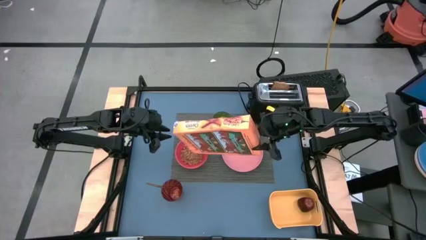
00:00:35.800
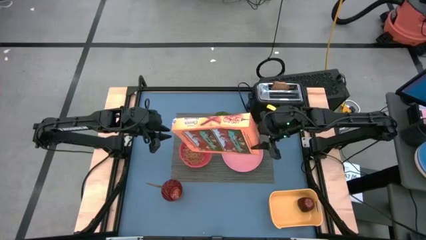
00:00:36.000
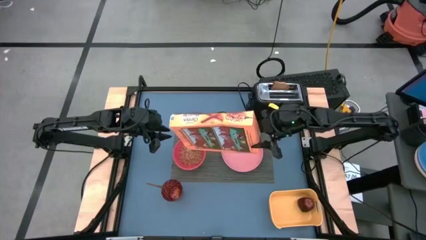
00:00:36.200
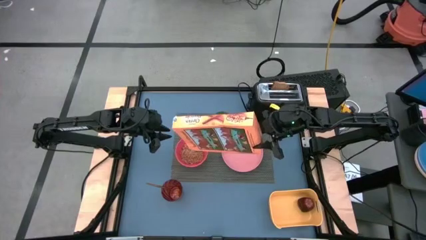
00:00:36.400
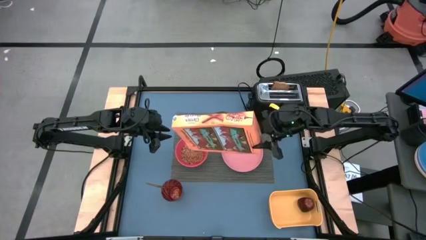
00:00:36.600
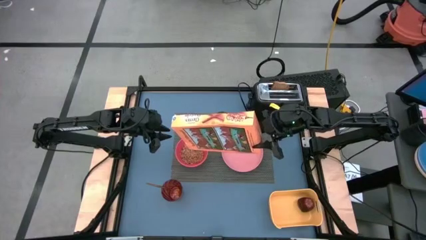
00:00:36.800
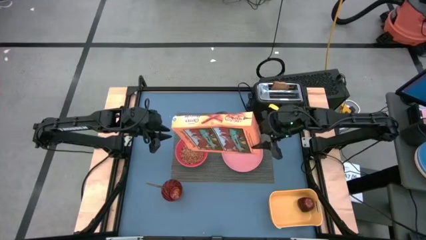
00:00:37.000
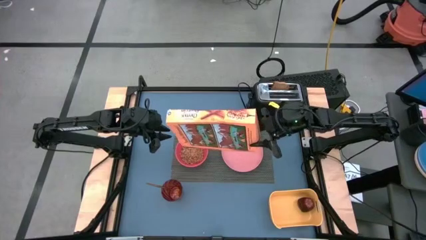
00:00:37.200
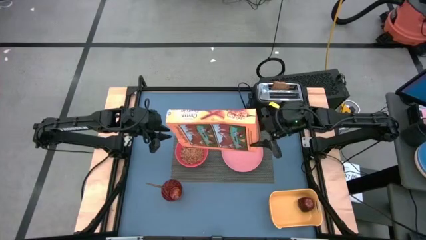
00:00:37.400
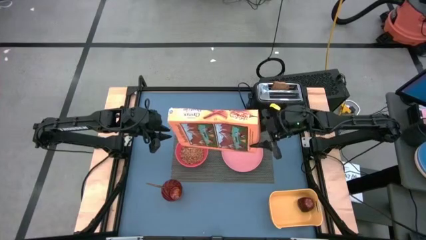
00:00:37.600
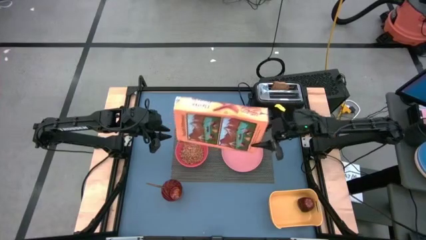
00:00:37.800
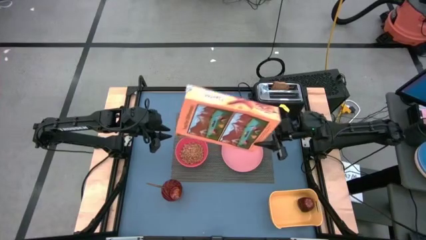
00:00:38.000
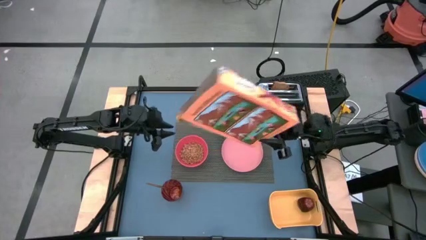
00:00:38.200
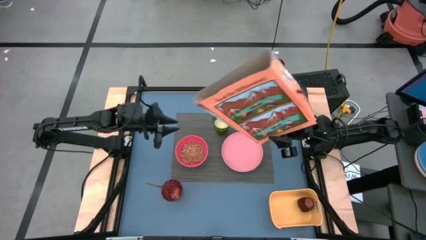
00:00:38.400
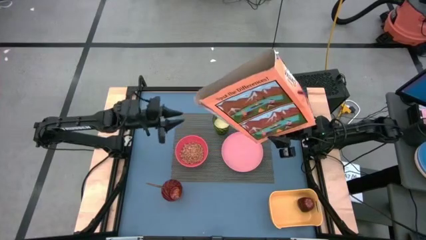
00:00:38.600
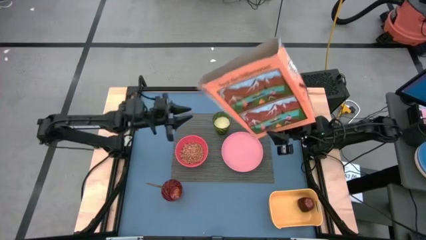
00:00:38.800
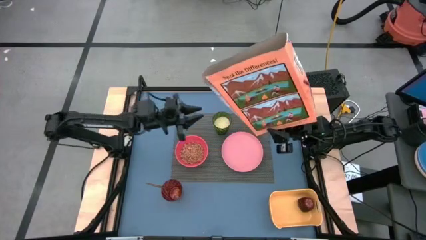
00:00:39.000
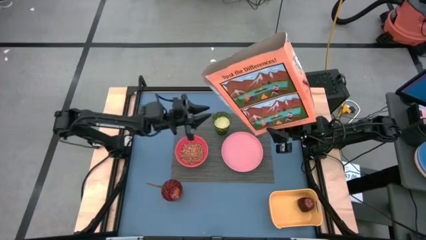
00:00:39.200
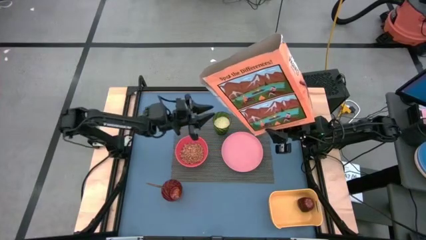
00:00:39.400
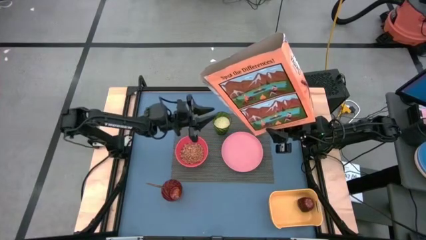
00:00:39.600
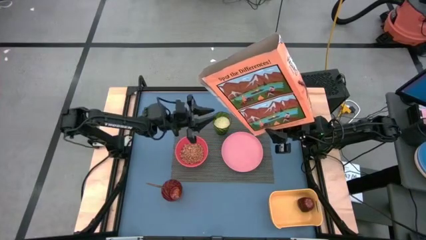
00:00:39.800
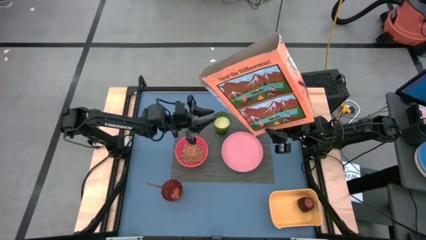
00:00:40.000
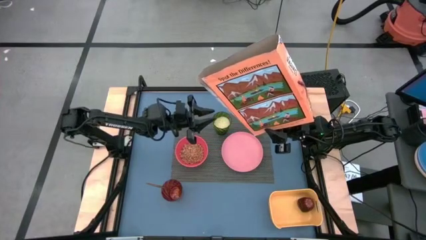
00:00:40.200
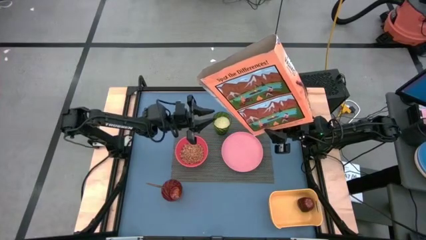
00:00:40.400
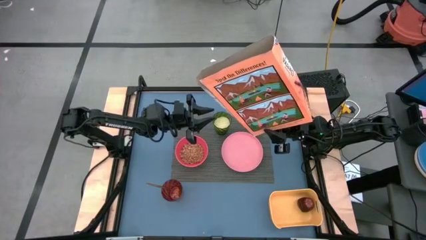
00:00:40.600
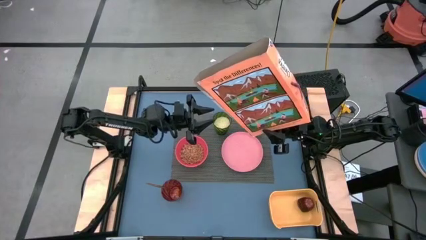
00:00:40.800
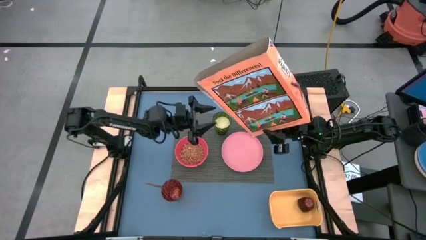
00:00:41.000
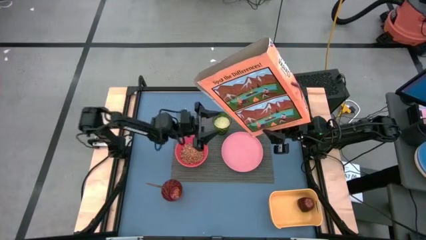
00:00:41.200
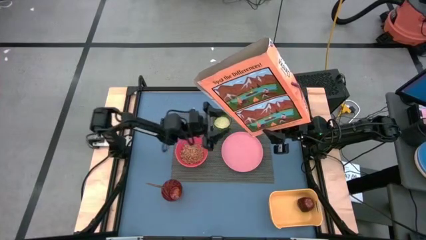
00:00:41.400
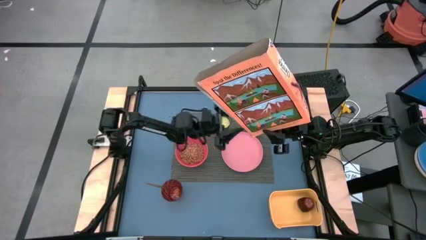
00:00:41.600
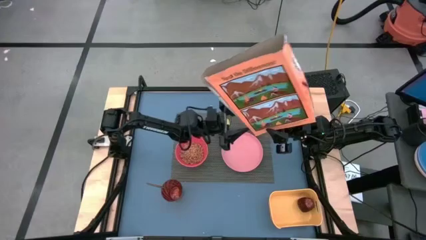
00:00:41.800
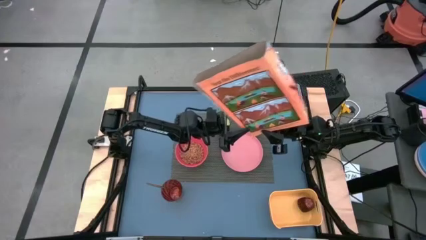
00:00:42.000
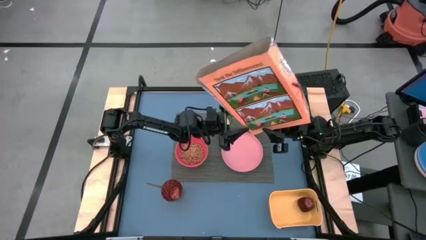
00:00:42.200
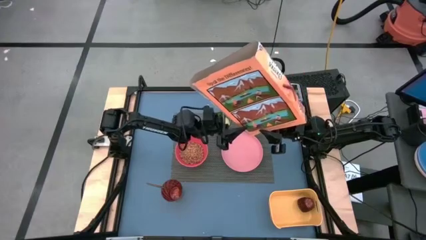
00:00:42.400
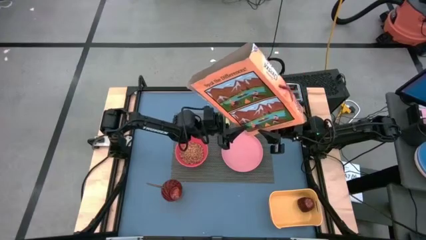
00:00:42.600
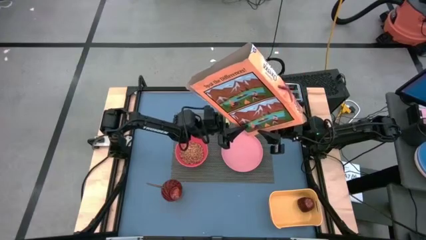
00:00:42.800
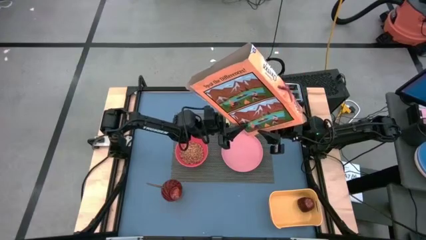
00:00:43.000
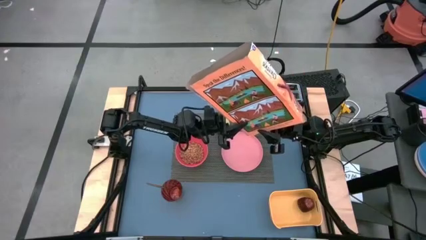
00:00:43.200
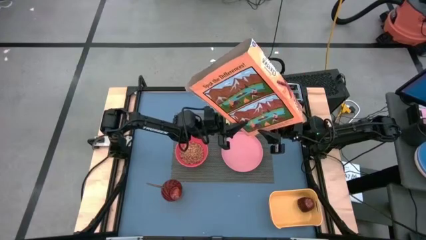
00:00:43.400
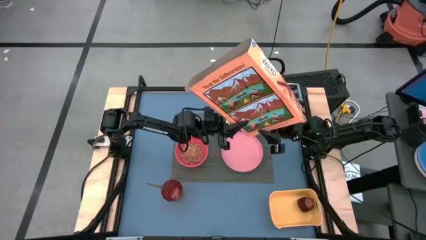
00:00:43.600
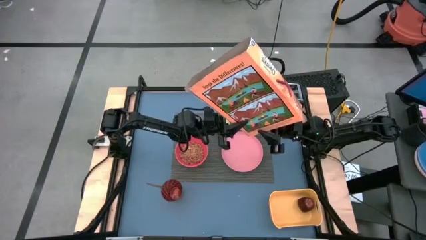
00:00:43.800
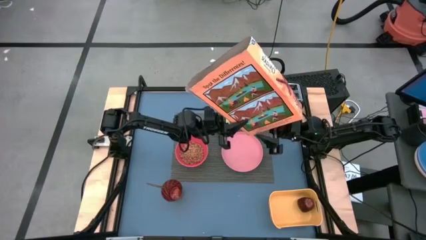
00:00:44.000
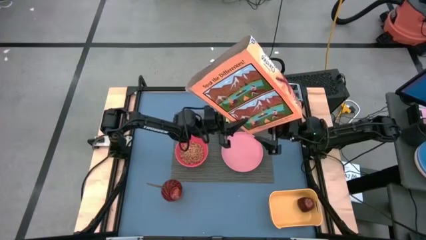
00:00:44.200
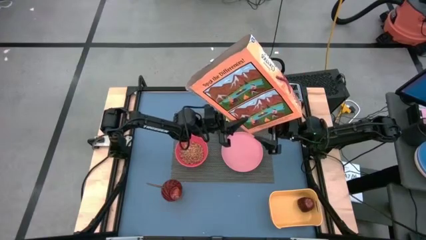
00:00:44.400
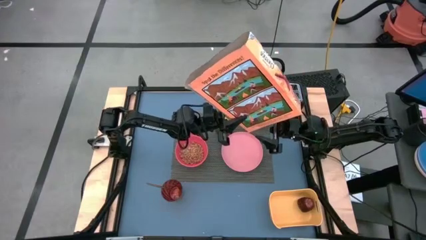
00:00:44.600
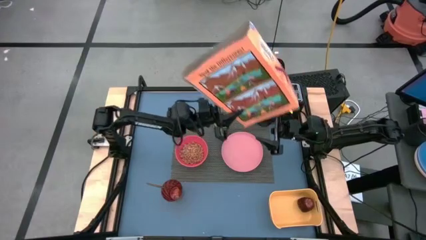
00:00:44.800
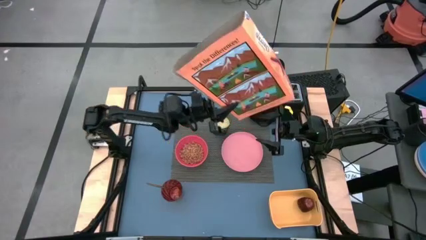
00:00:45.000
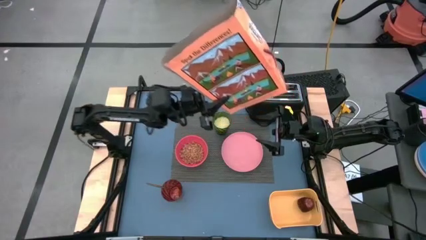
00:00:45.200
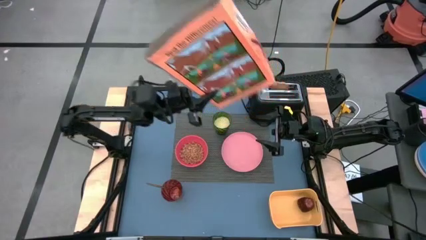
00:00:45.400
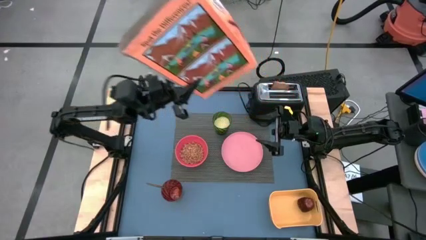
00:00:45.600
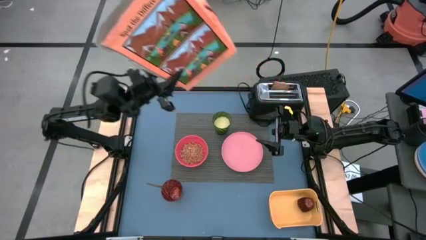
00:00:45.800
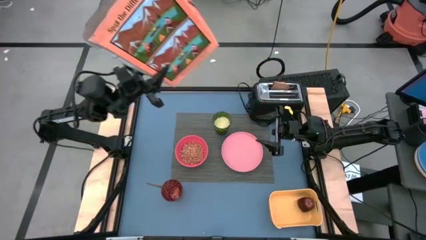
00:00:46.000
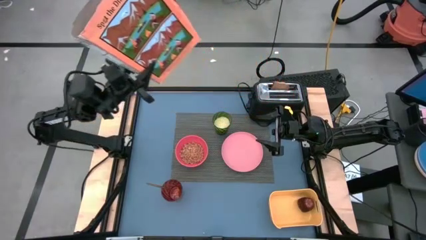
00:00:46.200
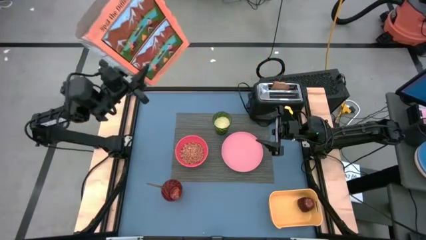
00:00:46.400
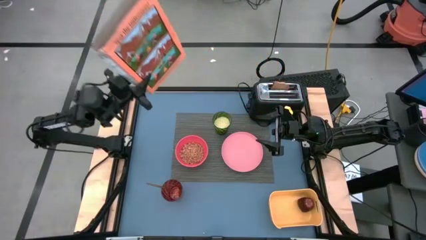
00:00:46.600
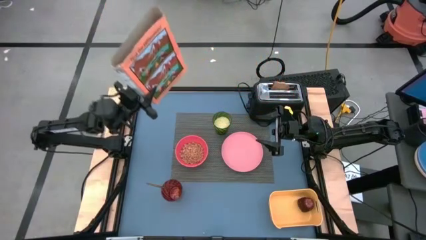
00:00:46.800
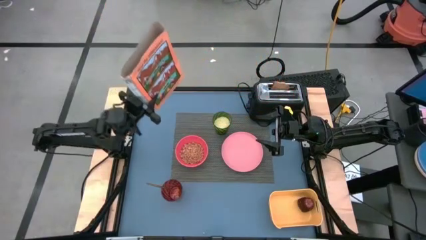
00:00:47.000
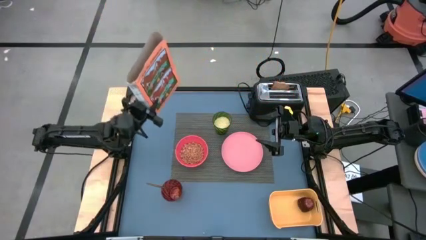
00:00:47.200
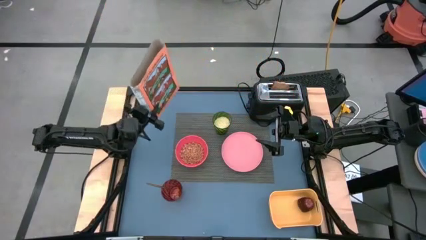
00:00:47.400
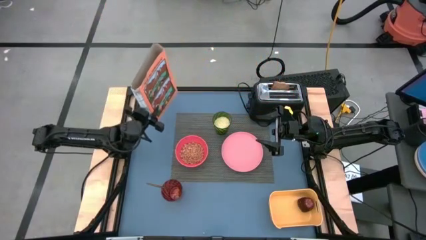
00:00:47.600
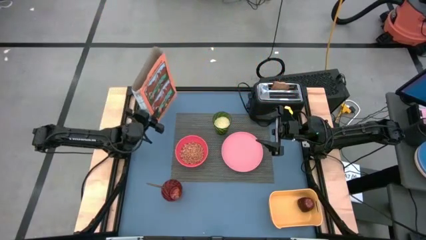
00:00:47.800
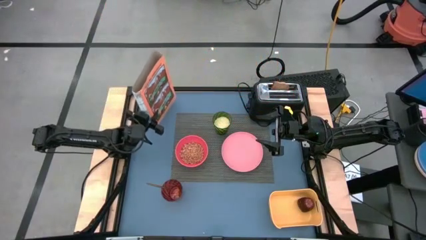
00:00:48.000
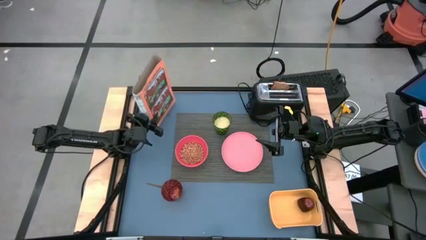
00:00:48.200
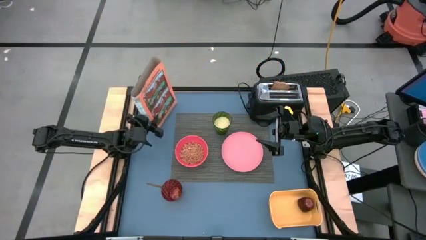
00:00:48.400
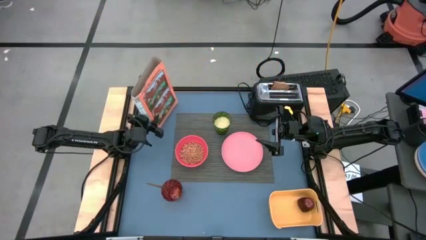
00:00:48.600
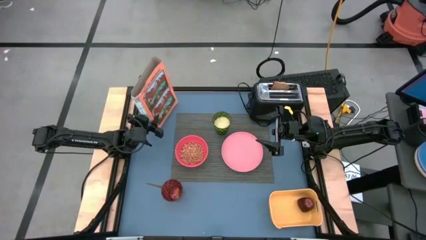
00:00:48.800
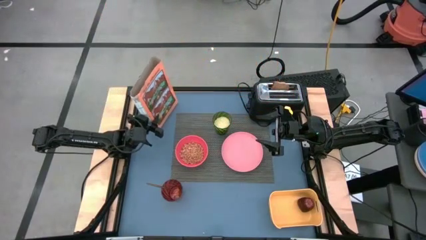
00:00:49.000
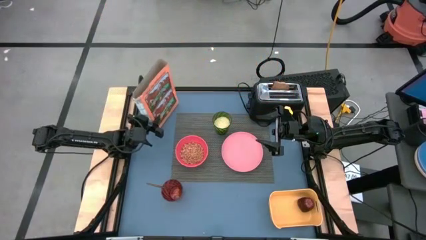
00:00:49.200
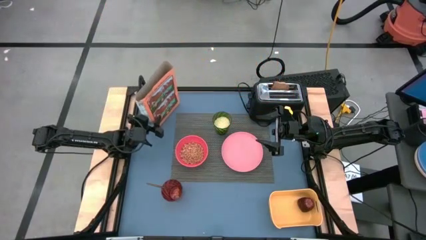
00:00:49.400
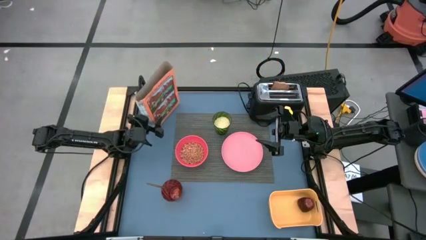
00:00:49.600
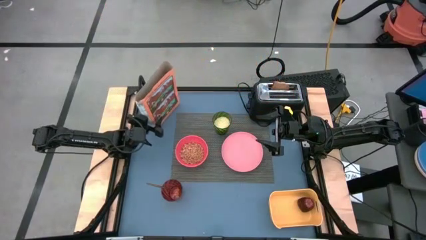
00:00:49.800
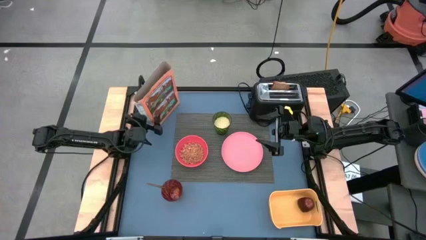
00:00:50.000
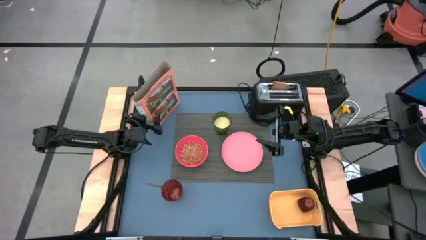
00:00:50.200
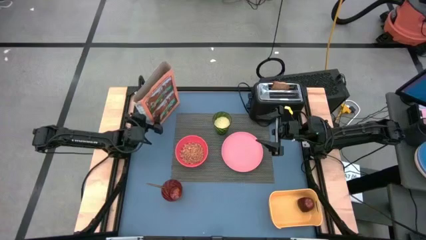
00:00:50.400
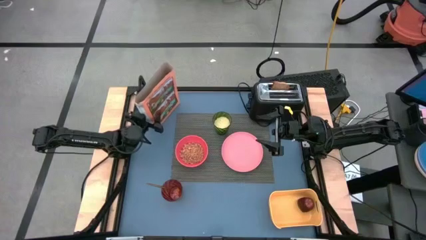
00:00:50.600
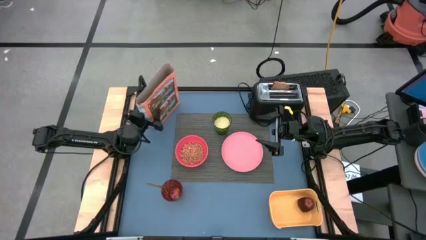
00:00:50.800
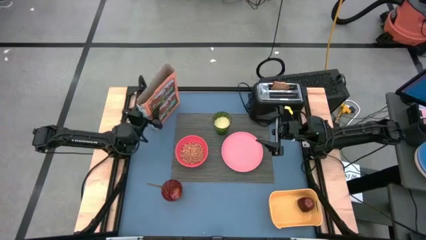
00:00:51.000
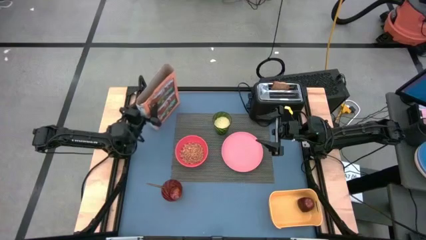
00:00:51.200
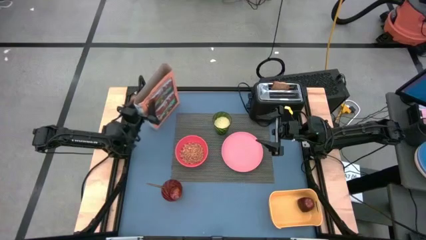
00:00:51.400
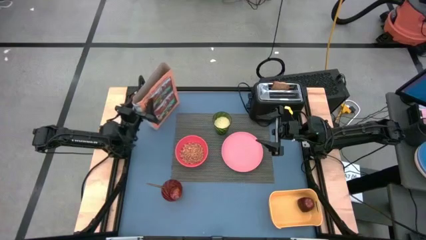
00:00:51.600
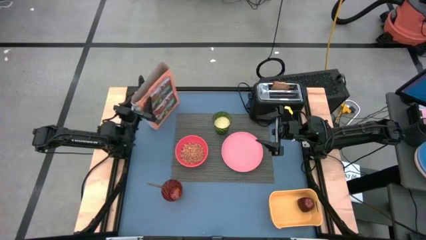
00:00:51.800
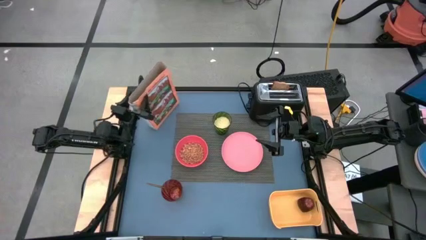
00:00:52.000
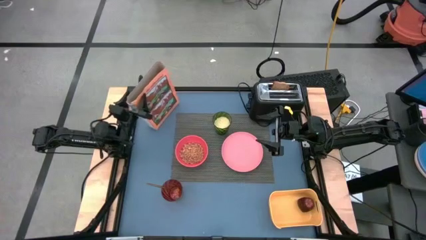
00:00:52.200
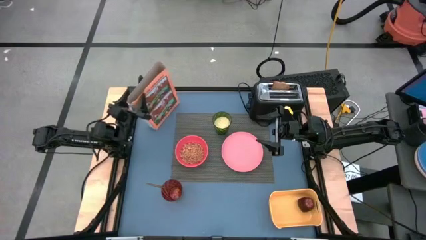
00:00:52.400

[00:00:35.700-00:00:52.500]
Task: Arrange a breakfast setting
Pour the cereal into the red bowl
